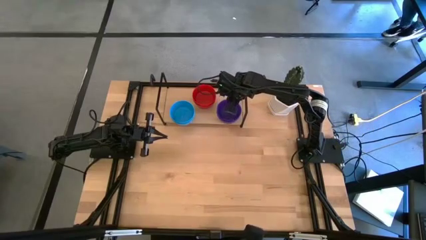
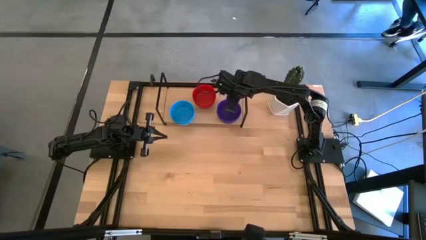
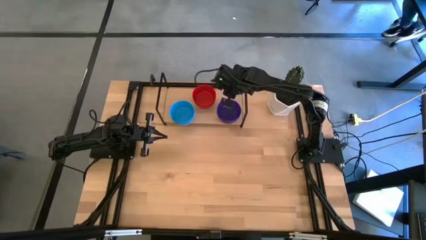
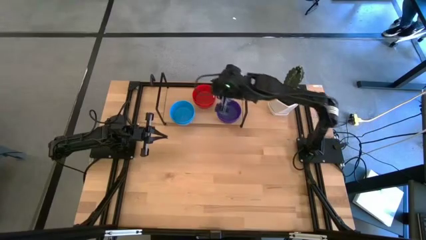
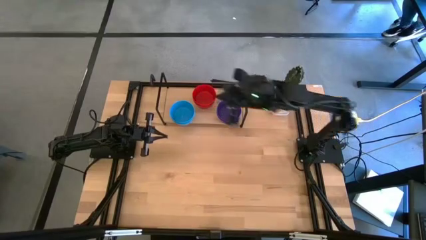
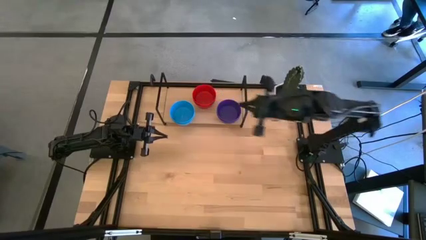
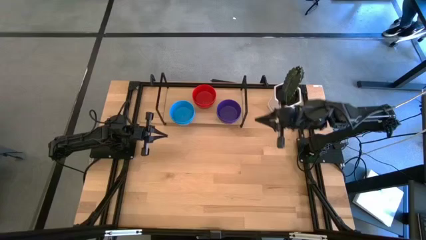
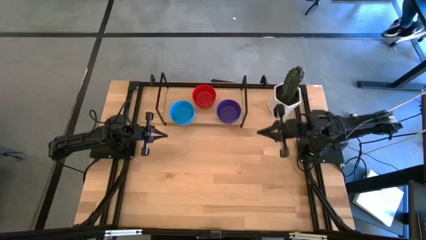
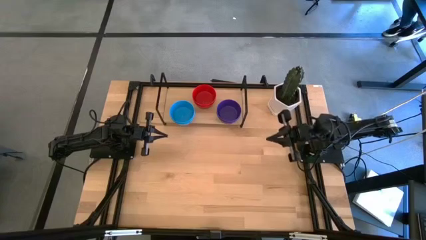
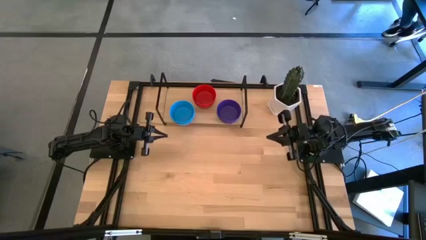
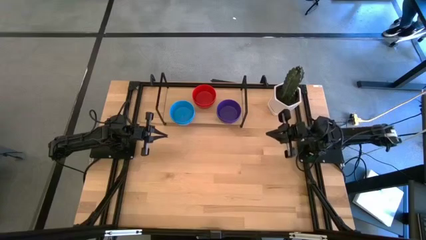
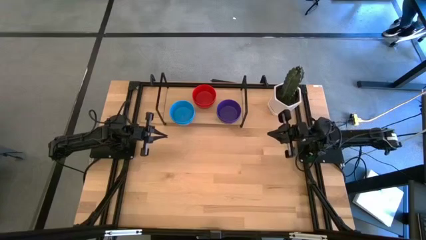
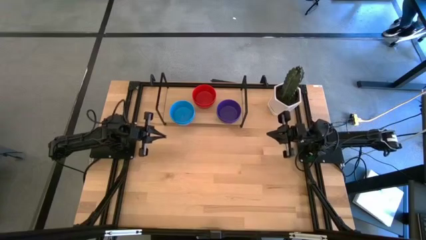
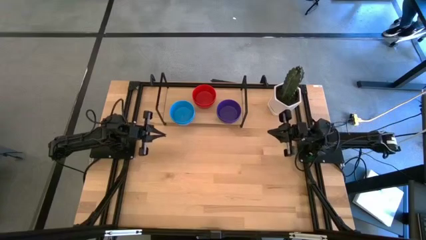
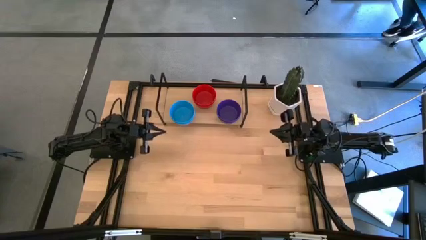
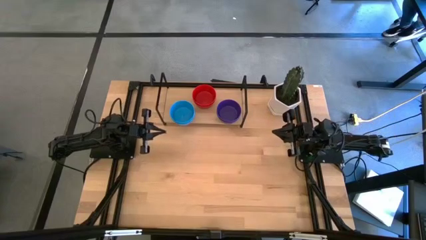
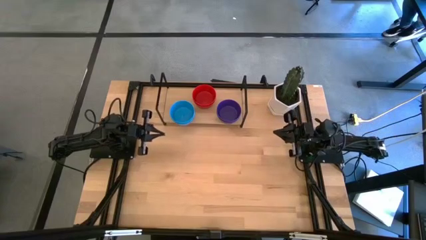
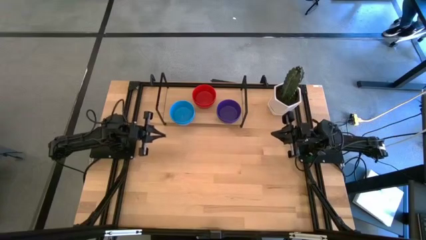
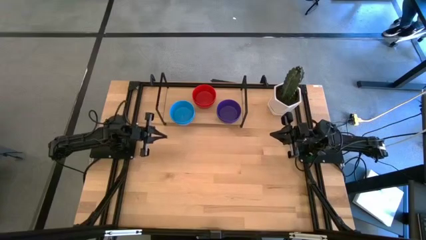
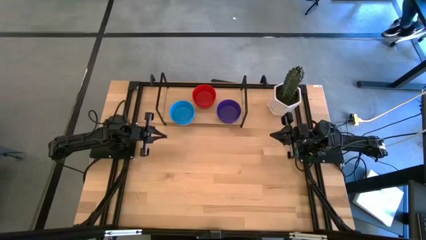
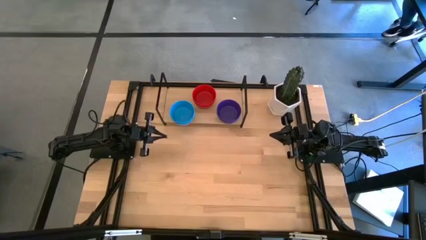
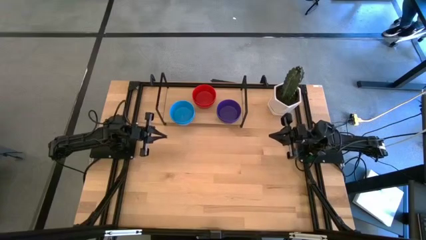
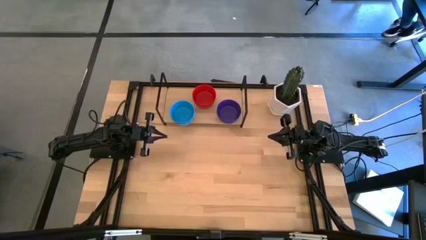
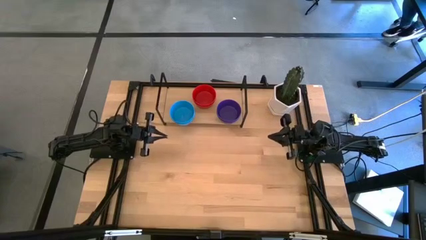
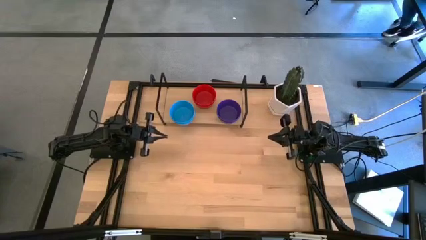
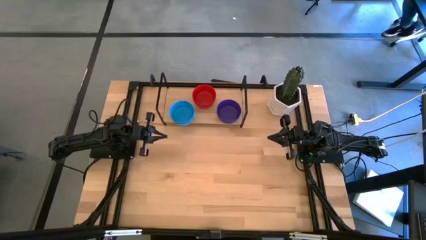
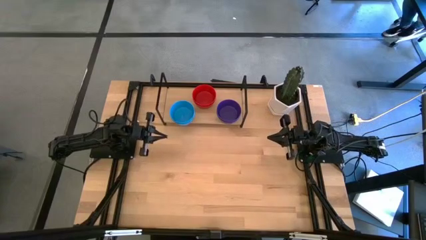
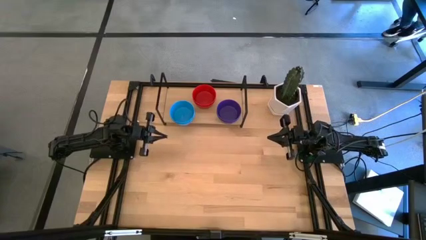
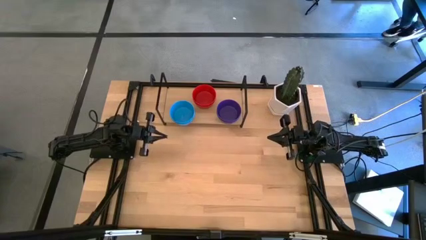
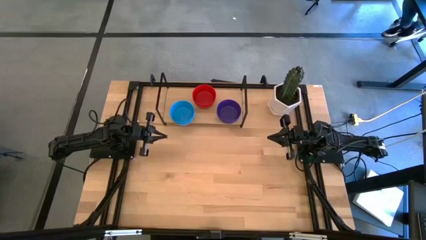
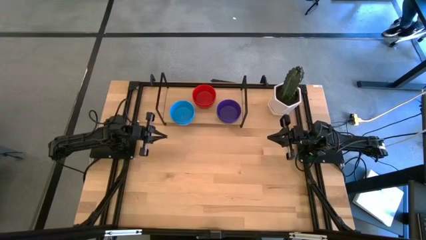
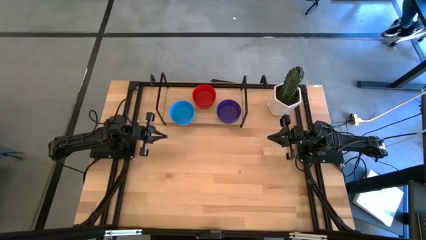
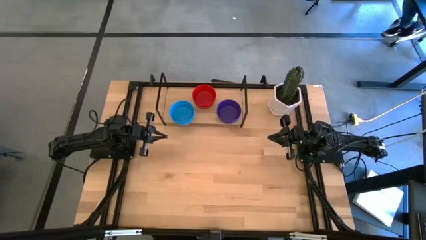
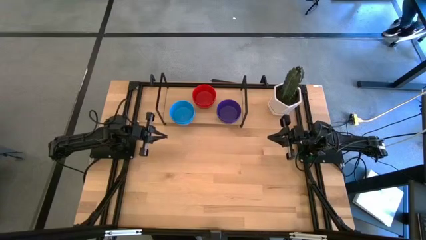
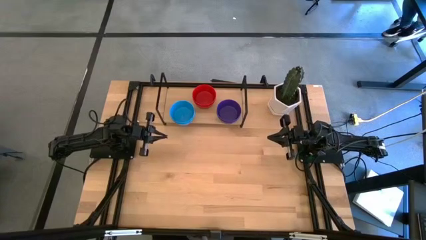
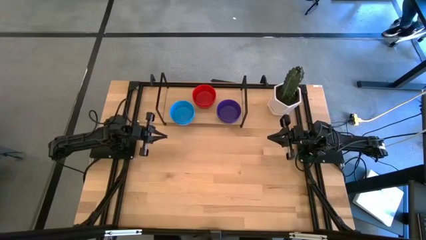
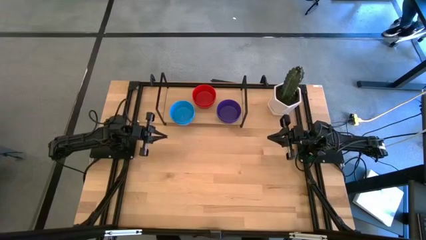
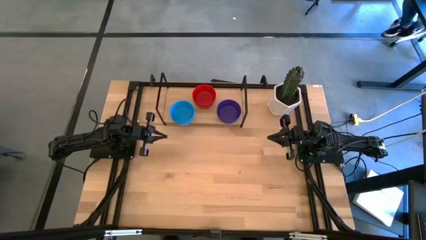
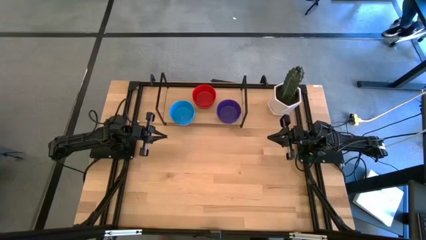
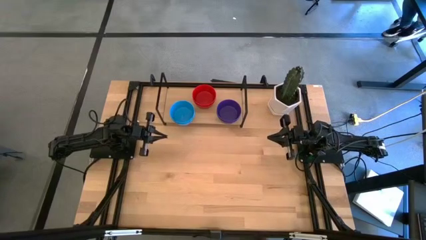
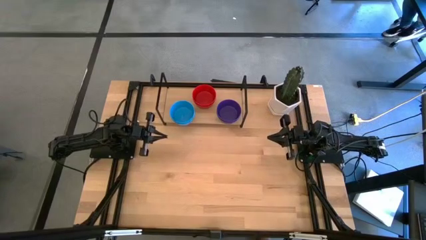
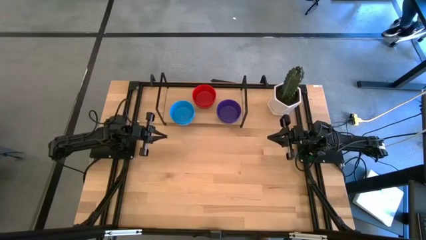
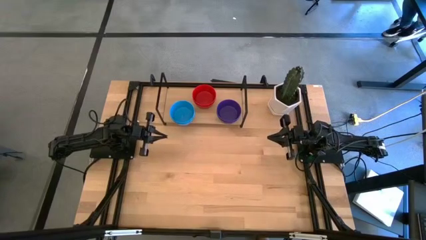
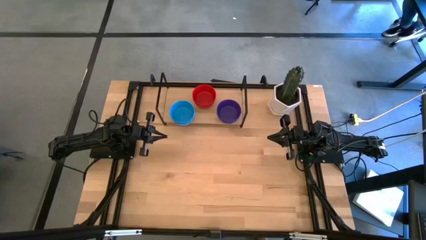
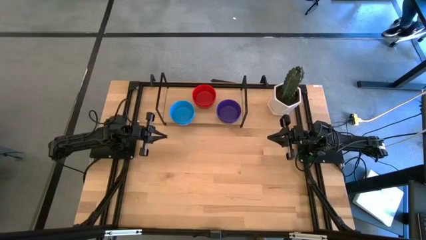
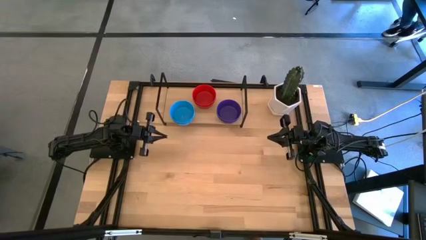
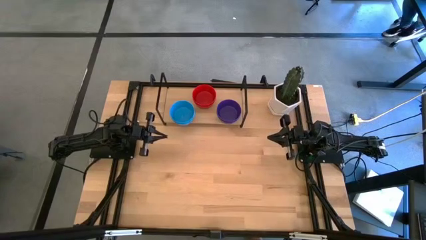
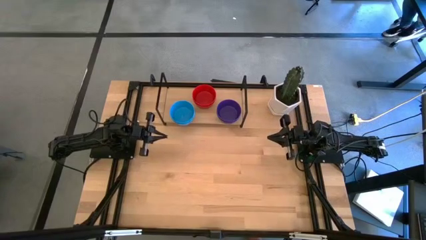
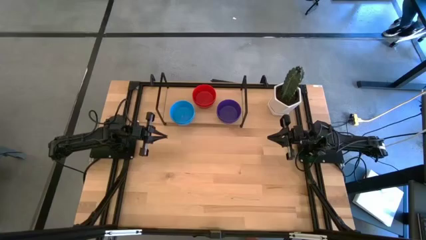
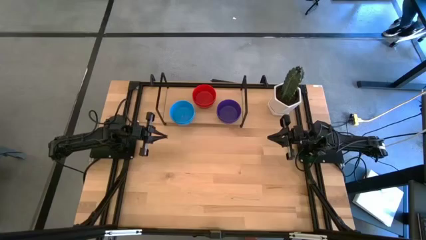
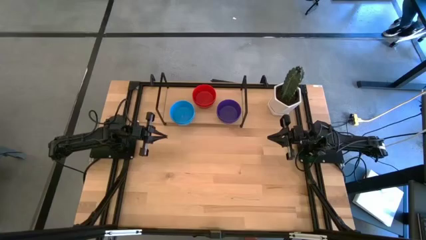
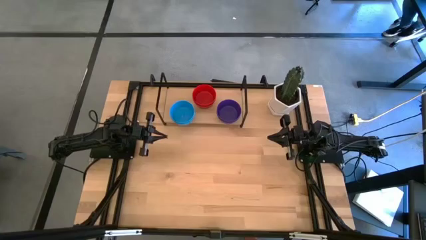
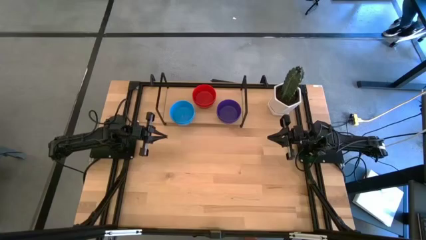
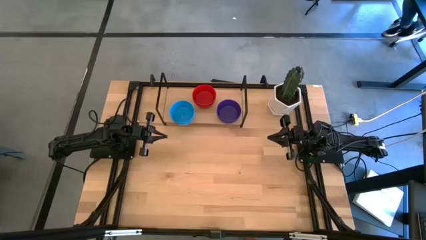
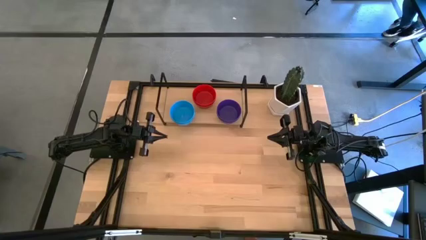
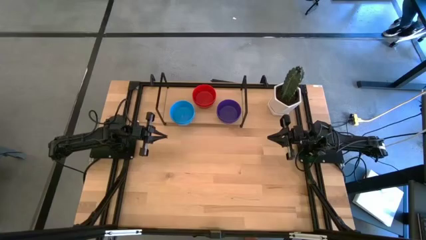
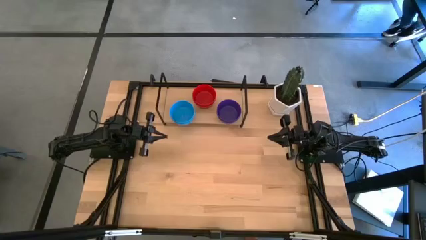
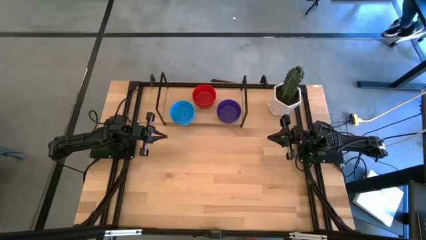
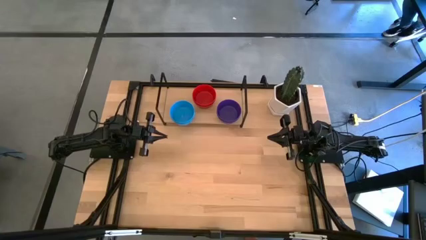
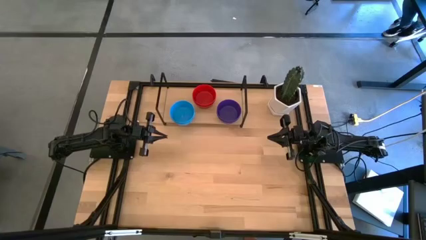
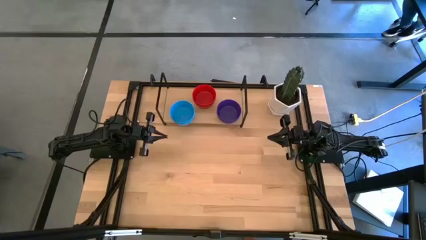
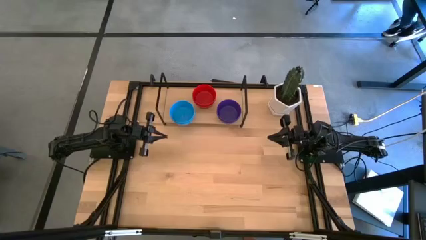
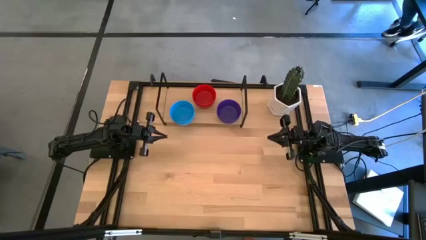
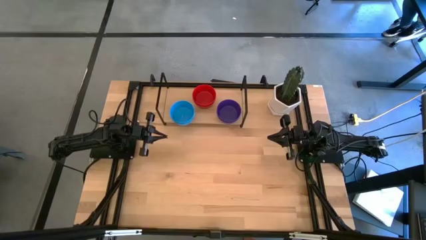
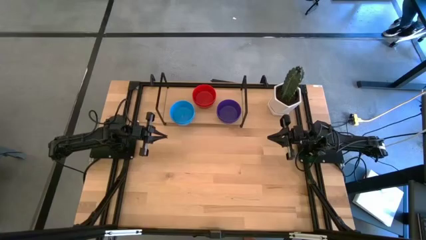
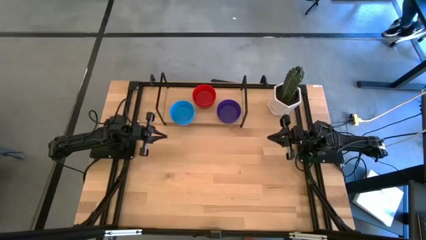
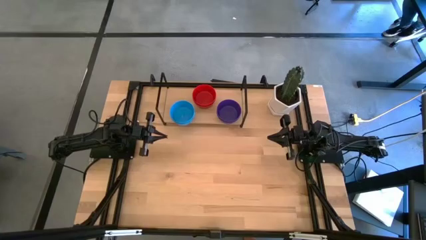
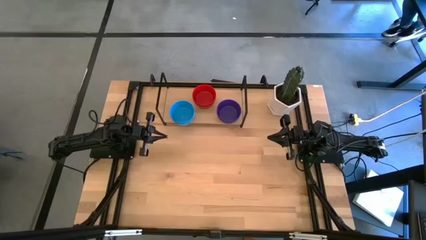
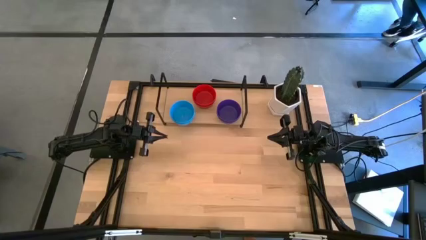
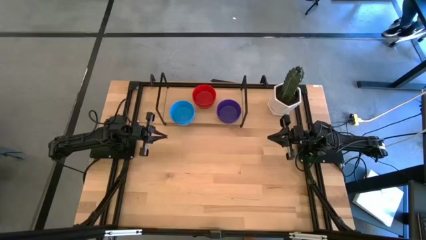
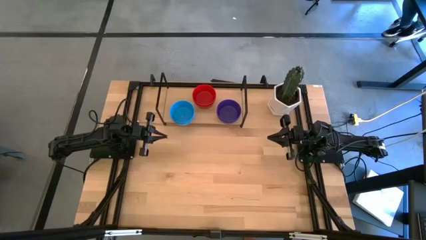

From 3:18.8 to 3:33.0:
Task: Pick & Place Mini bowls
Return to Home Position

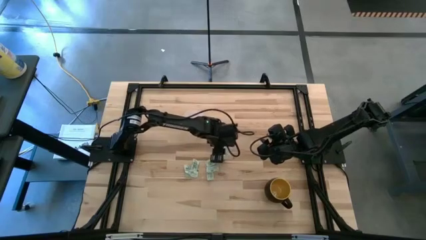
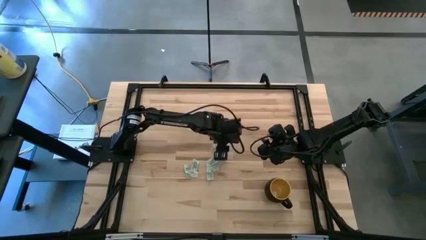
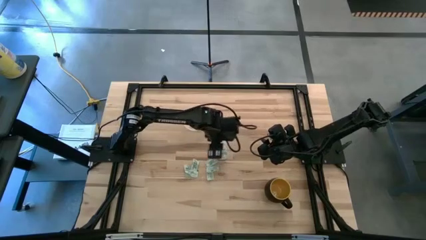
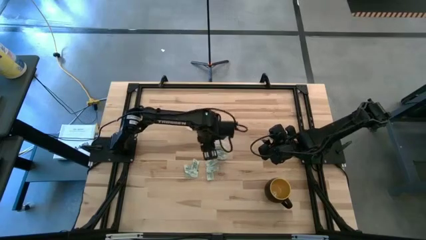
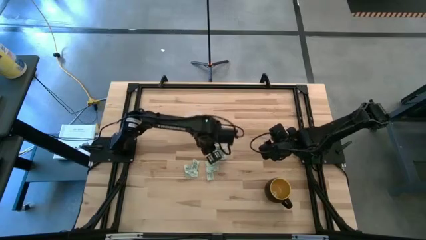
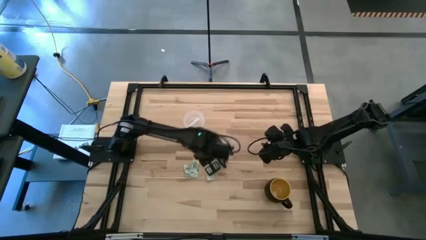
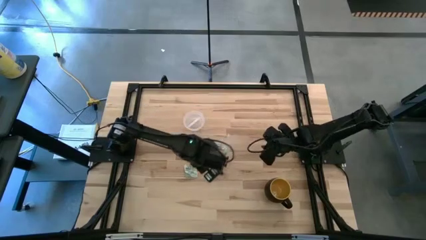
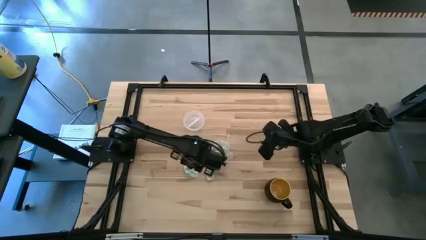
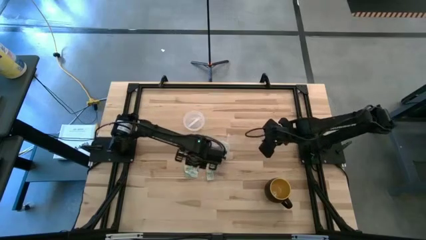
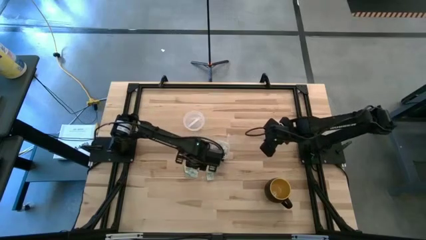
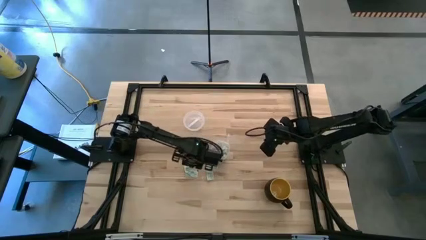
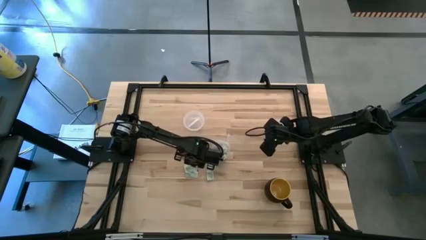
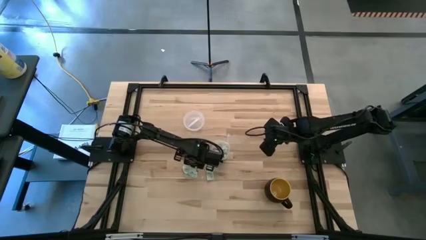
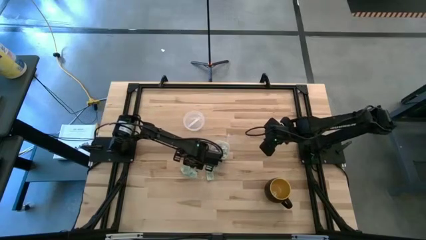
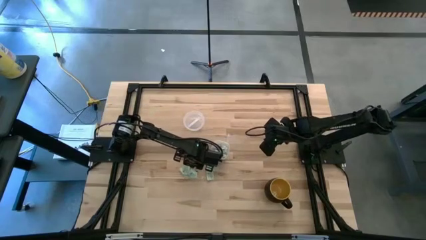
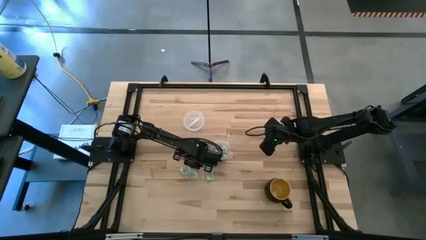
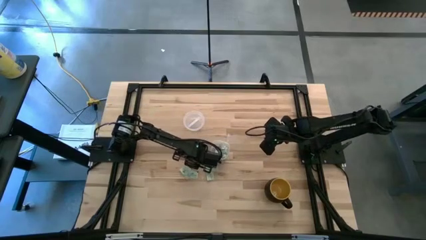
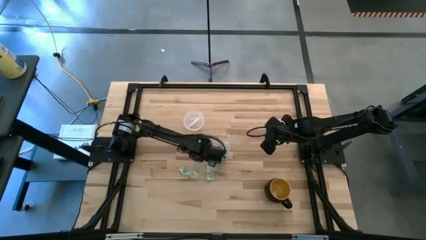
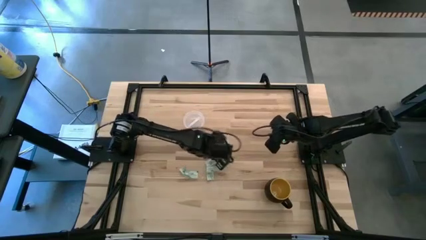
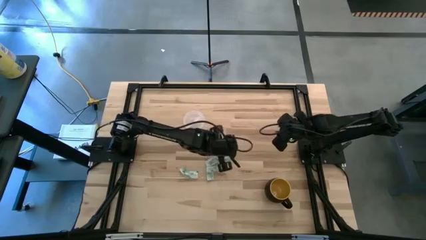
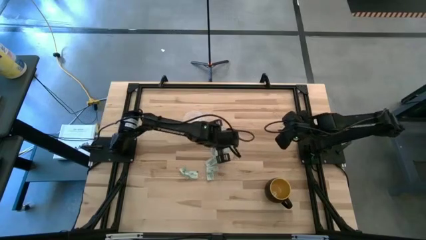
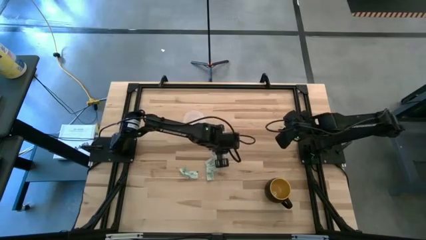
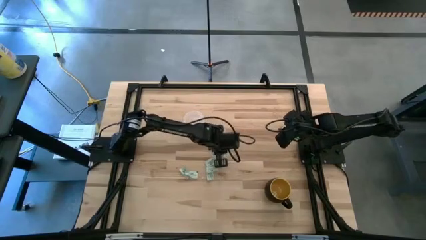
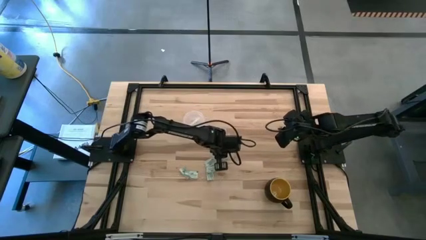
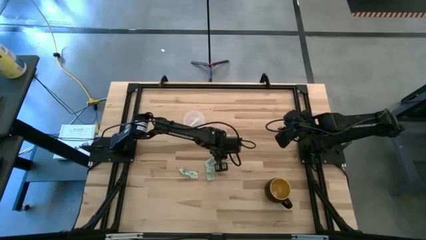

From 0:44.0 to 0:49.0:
Task: Pick and place items into bin
Put the light green stevia packet into the transparent bin
